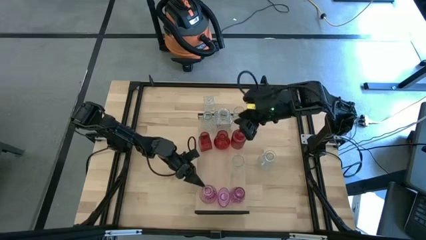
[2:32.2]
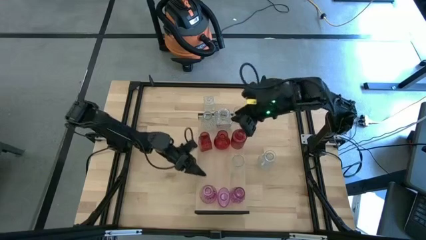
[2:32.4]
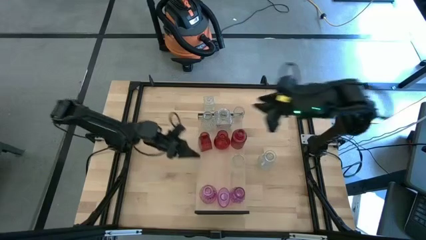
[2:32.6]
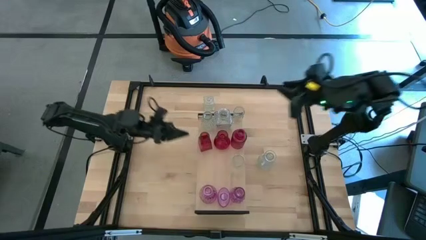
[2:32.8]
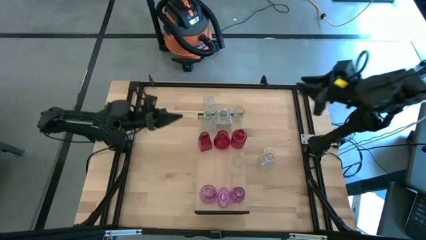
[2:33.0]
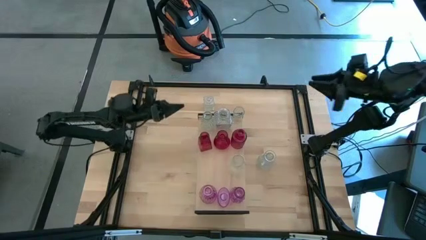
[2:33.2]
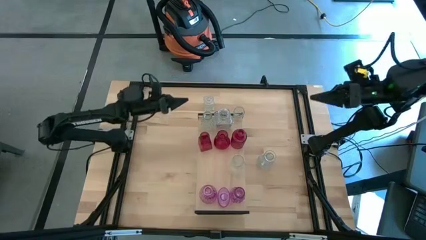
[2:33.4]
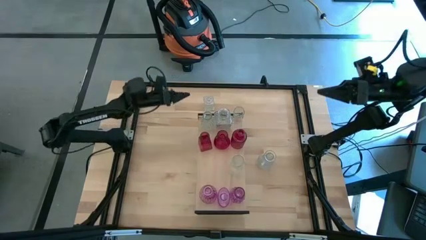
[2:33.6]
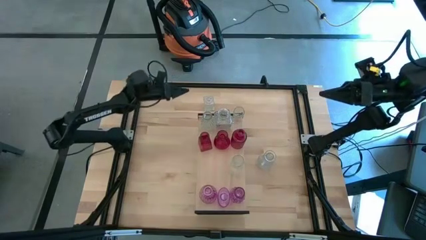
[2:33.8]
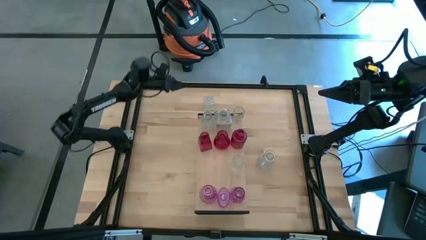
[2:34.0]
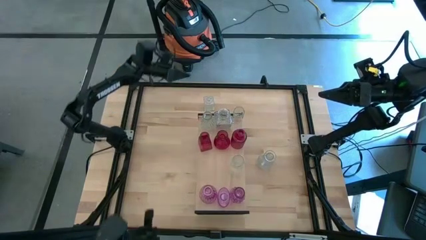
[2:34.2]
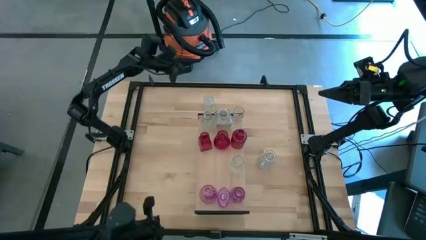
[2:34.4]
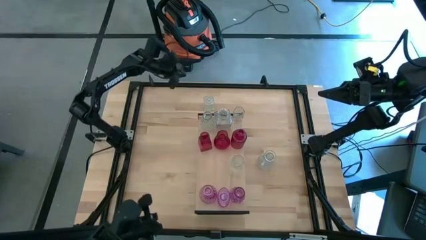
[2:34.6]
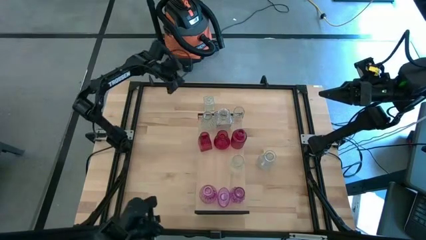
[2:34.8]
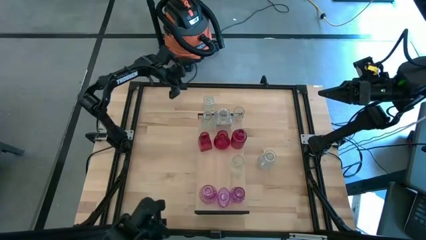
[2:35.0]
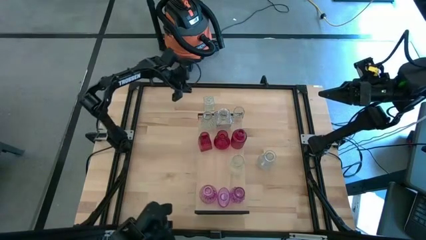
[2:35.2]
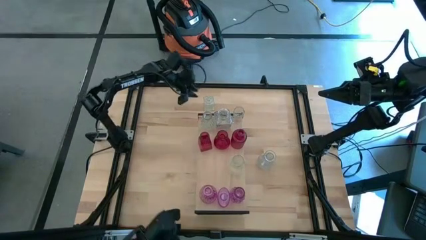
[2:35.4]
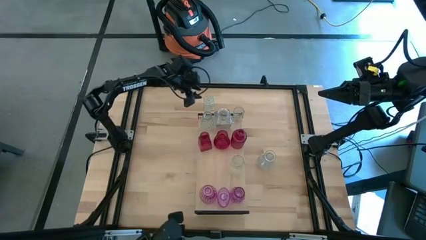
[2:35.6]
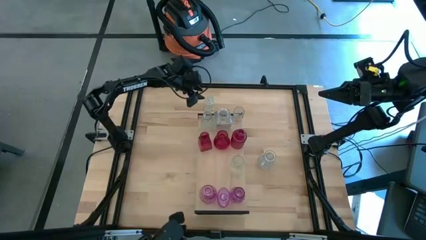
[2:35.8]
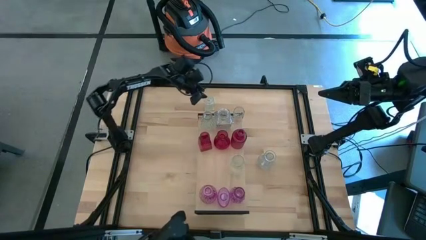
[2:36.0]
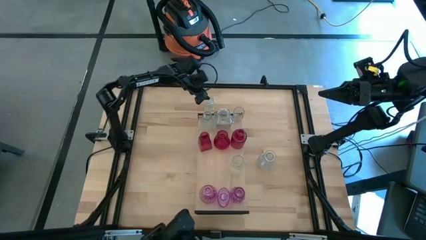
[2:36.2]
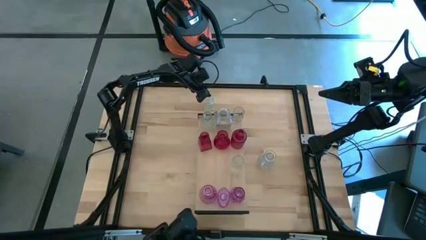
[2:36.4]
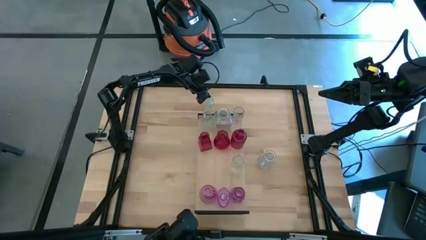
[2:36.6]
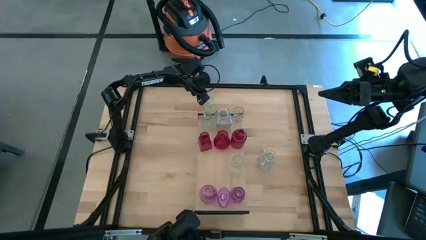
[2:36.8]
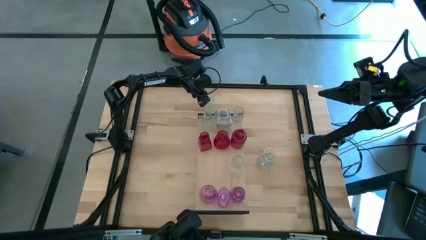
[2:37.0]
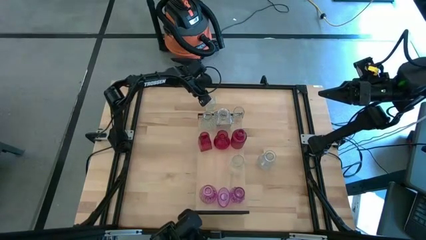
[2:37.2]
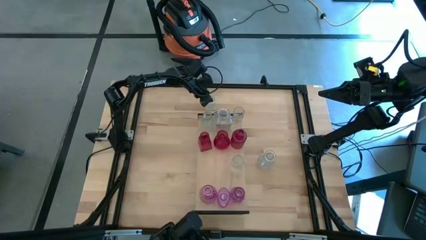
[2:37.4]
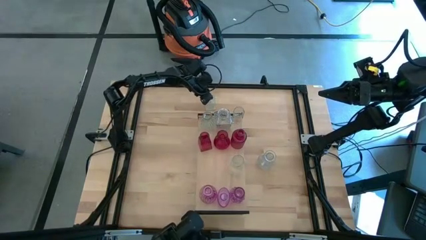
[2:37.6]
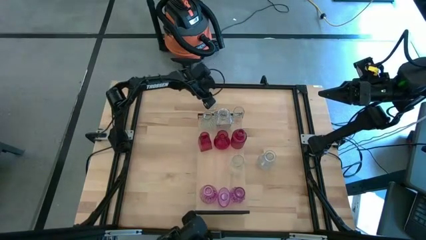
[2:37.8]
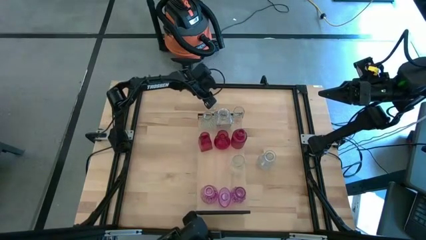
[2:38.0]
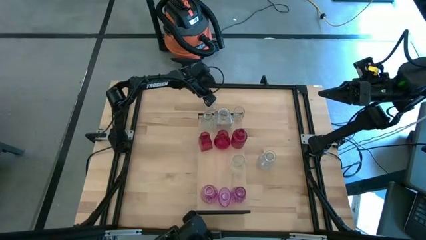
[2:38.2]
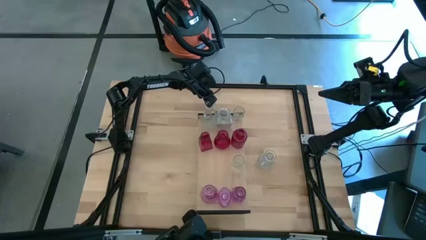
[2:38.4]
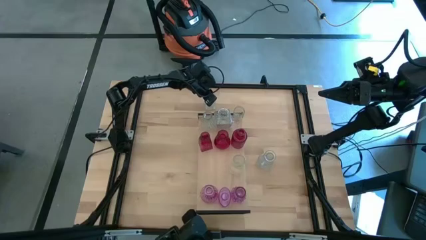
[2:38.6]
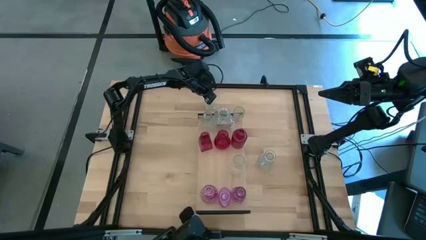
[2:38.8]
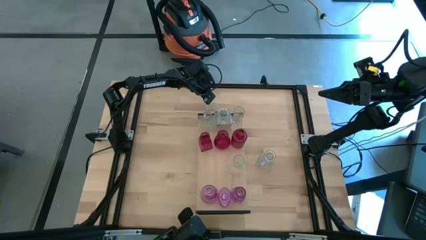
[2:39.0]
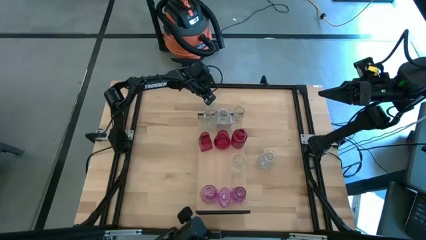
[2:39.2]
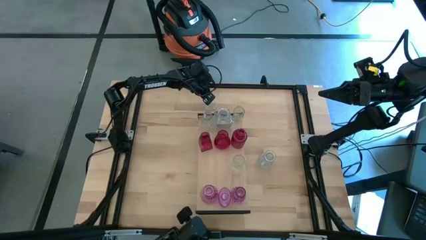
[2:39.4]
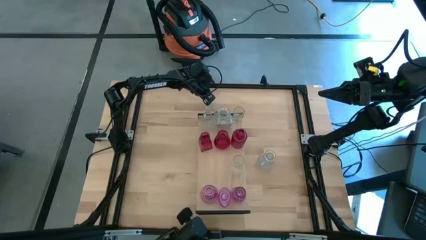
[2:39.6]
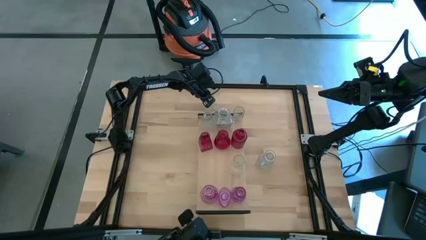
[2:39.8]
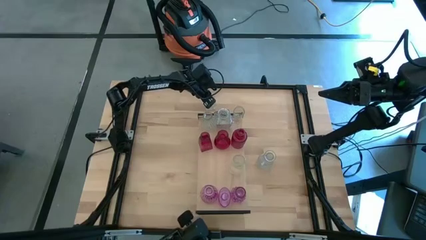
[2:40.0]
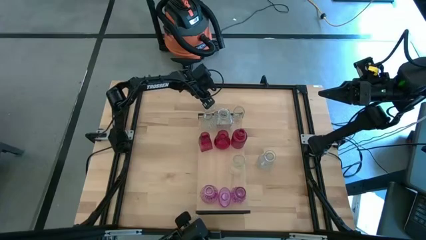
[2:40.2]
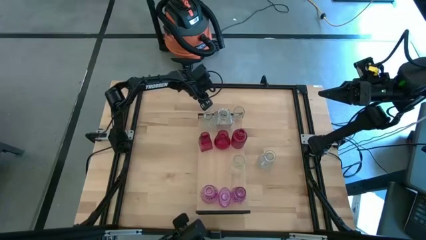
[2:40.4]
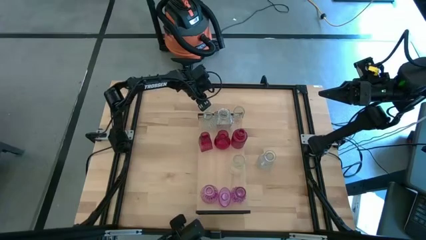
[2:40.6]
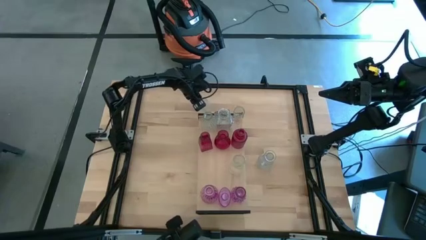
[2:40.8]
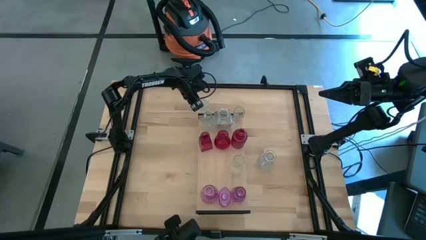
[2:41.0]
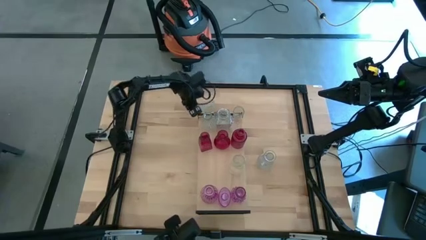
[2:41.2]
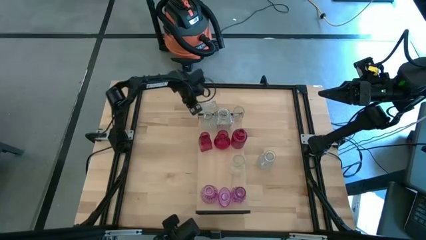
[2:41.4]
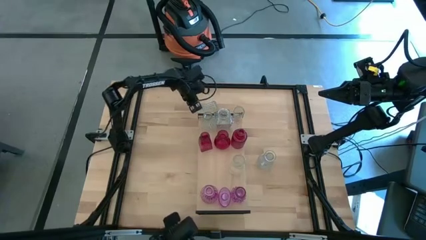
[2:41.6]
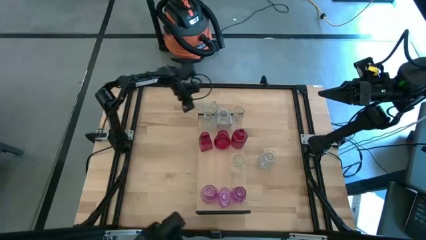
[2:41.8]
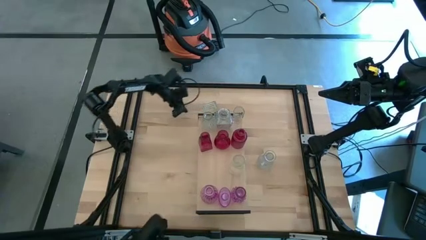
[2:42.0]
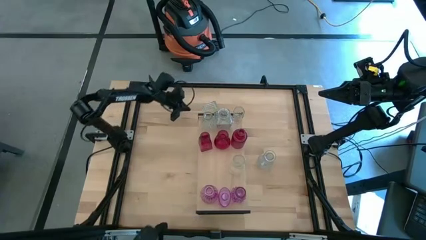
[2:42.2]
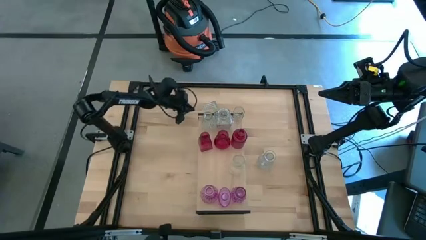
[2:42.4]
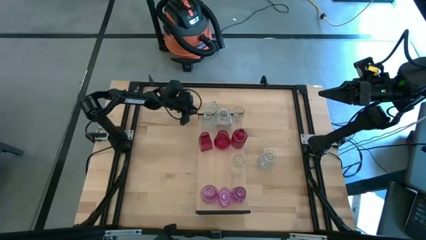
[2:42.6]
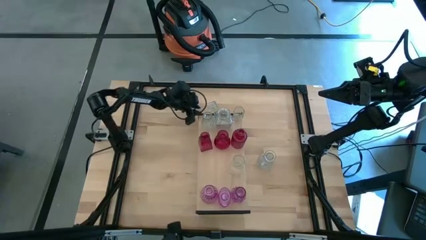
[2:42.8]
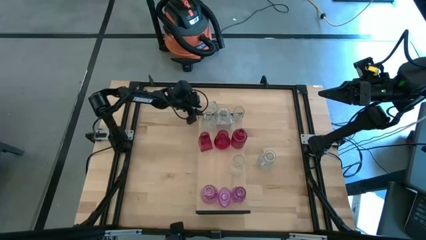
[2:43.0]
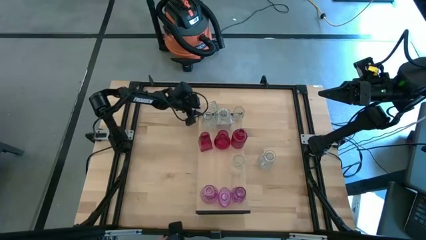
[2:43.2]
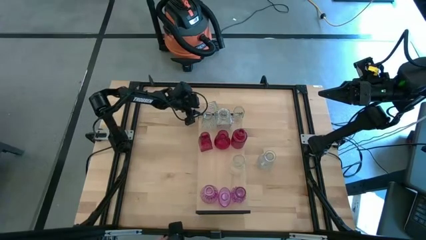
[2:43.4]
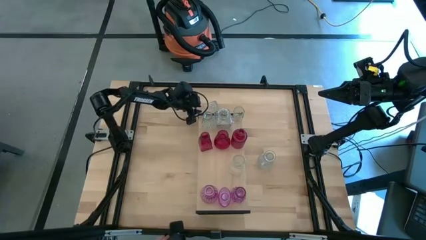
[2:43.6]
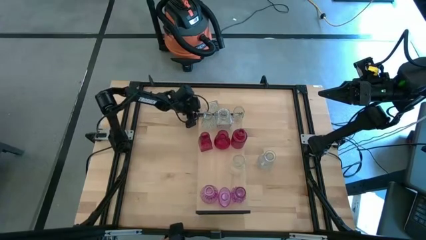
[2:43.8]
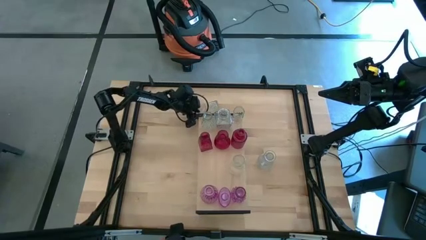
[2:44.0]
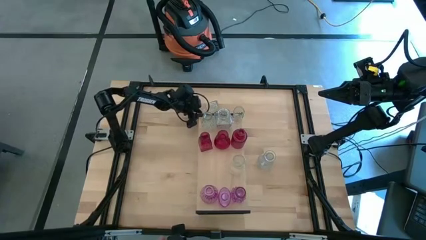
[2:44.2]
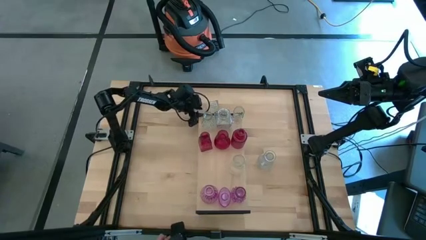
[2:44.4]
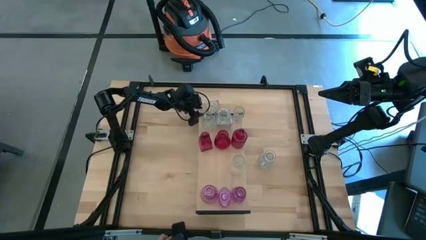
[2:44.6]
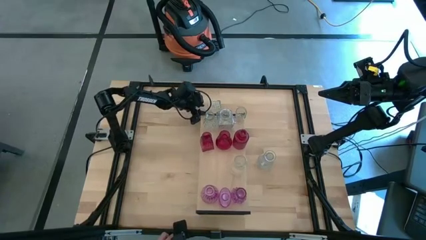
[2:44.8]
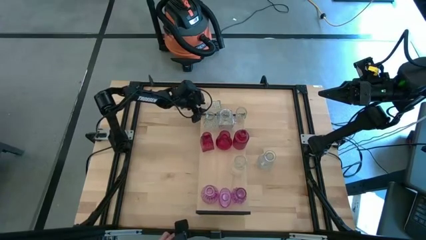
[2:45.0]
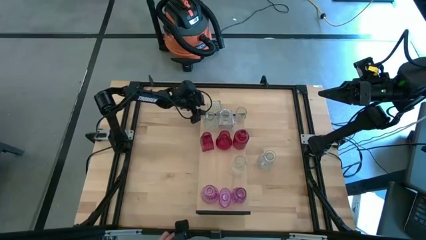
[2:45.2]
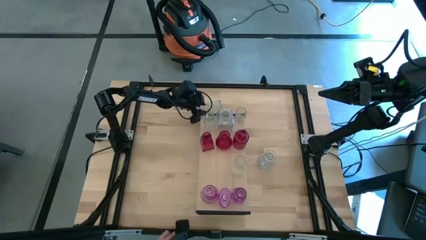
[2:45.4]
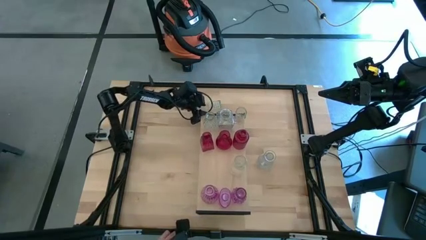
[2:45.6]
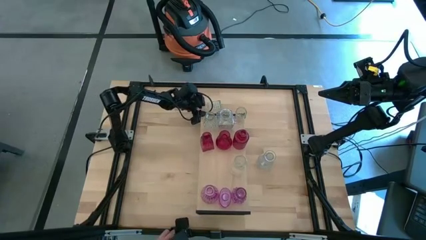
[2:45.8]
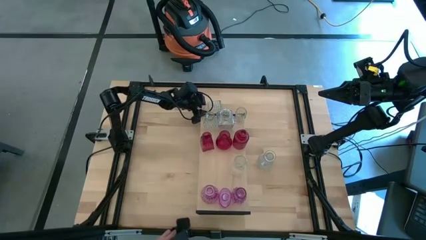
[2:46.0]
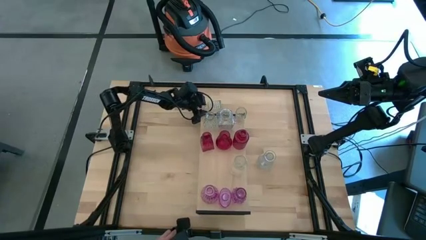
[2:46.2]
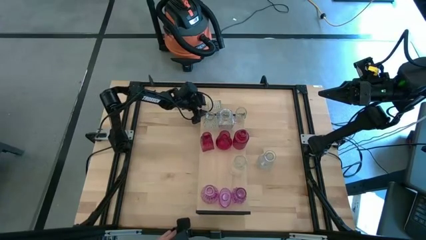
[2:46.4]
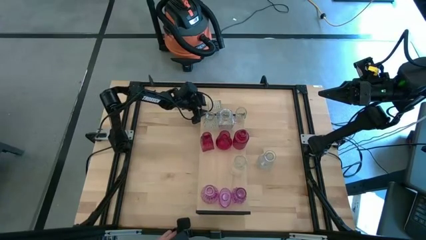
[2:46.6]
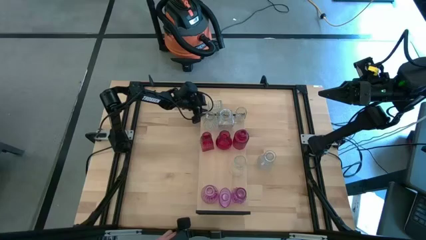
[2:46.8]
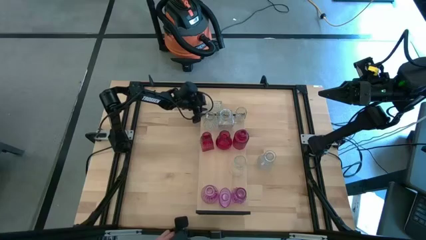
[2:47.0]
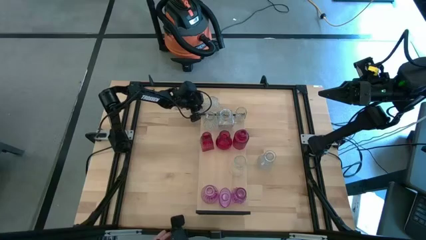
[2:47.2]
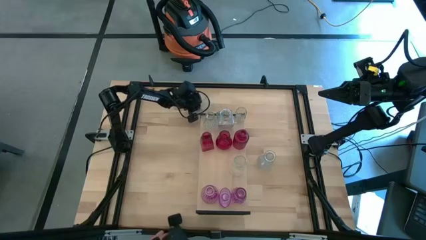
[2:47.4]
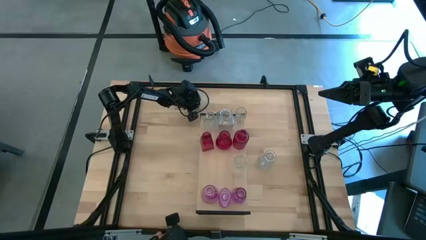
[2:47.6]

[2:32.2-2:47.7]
Task: sort vases onto shelf
Put the transparent vase on the shelf aligned with the transparent vase on the bottom

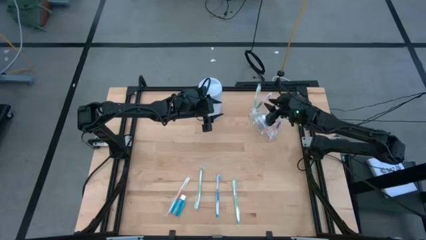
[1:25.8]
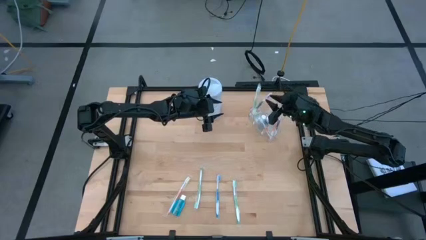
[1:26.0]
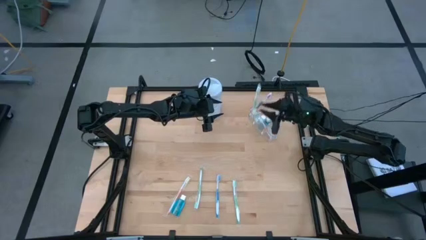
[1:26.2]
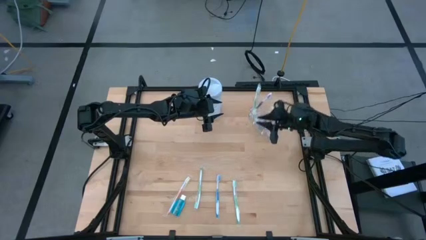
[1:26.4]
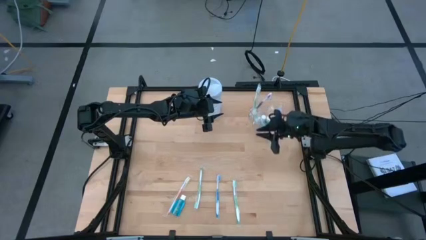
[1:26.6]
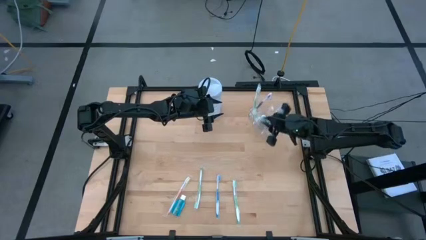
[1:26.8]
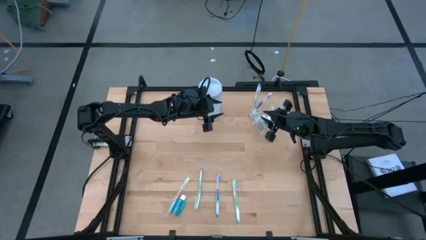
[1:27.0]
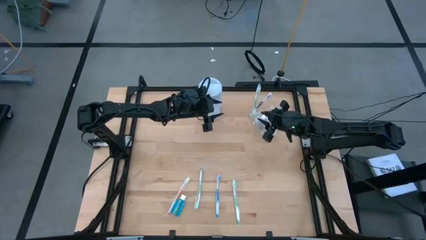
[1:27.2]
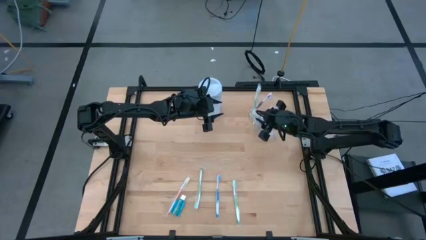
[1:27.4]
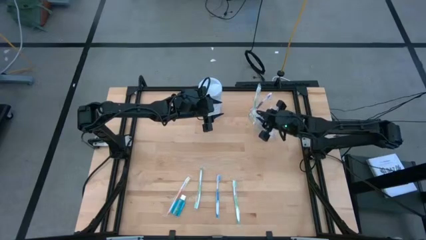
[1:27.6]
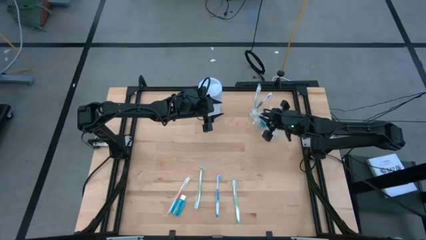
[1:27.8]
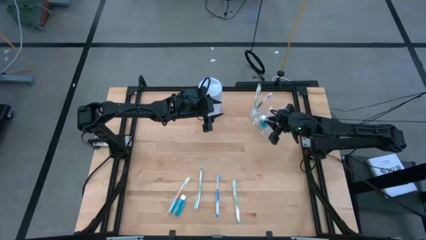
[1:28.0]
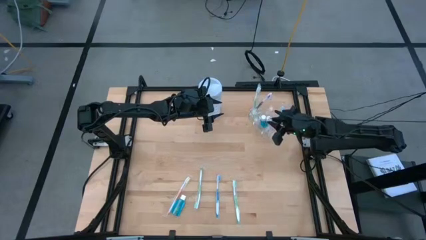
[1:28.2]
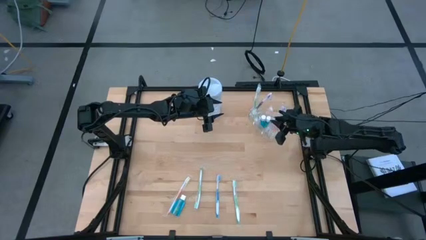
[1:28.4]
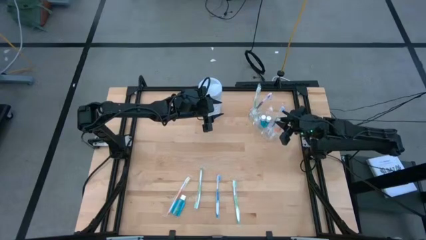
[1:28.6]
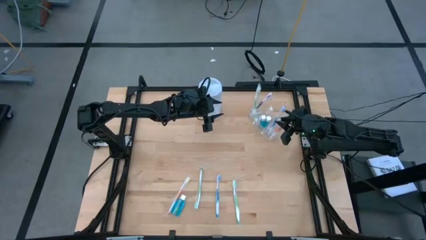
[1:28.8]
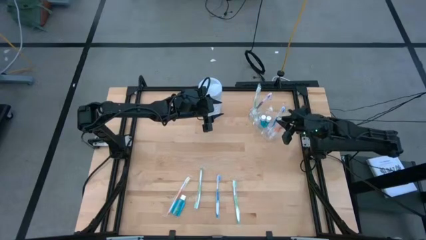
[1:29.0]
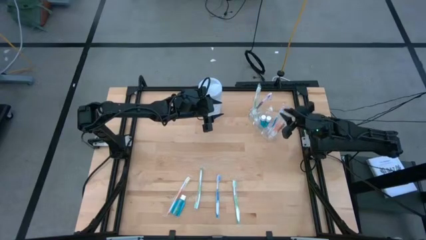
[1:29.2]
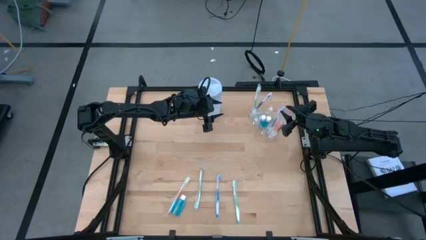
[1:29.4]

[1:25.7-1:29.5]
Task: Pick & Place toothbrushing station
Adjust the orange toothbrush in the transparent organizer
